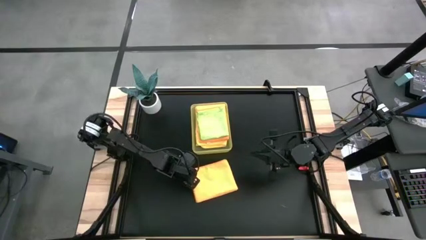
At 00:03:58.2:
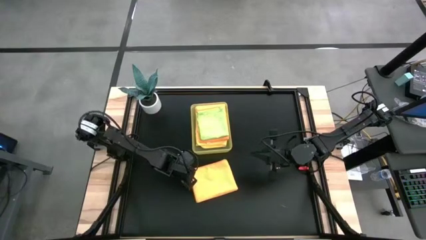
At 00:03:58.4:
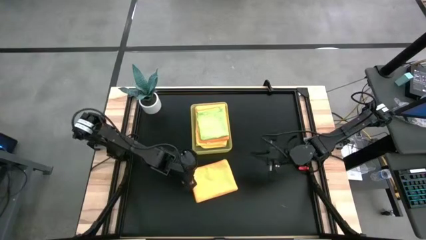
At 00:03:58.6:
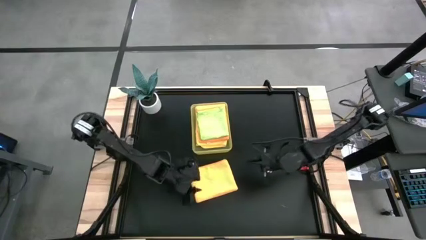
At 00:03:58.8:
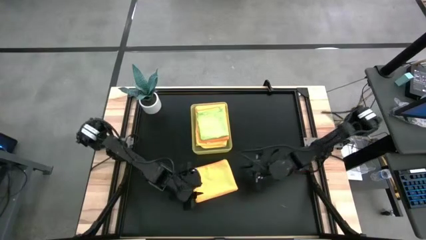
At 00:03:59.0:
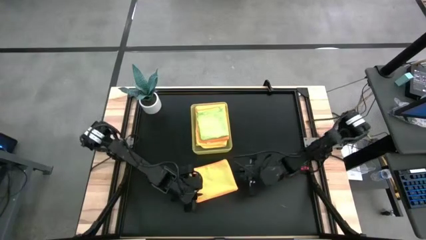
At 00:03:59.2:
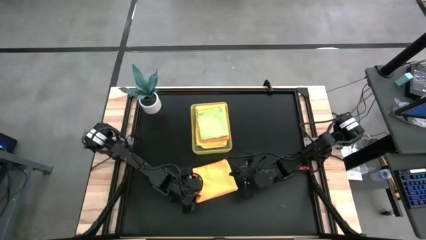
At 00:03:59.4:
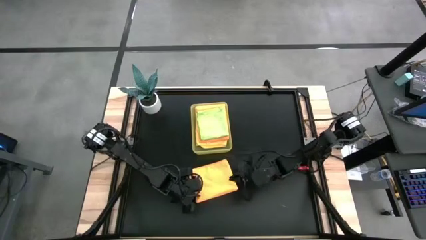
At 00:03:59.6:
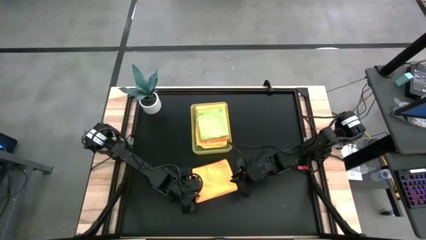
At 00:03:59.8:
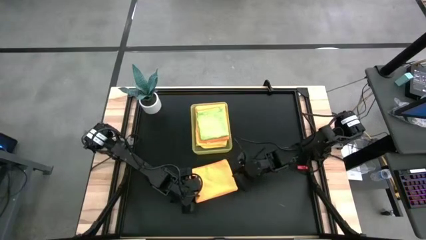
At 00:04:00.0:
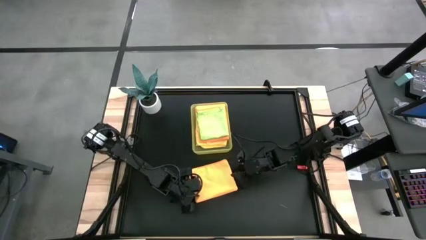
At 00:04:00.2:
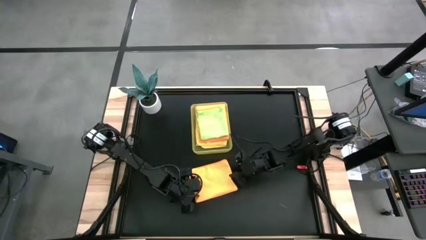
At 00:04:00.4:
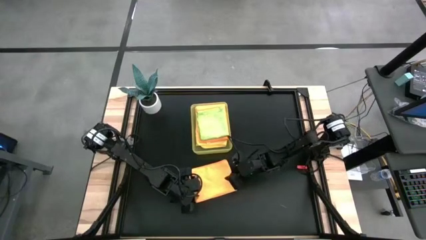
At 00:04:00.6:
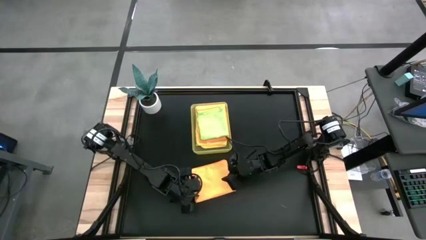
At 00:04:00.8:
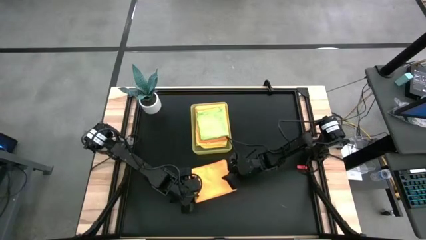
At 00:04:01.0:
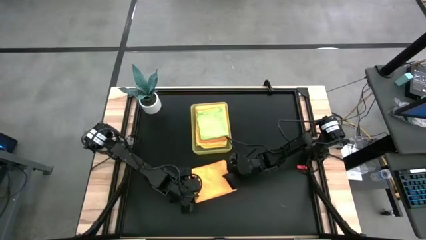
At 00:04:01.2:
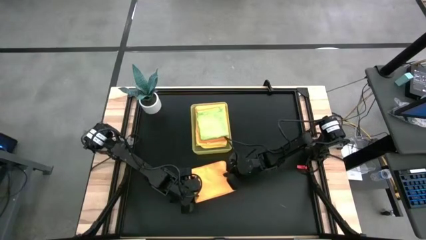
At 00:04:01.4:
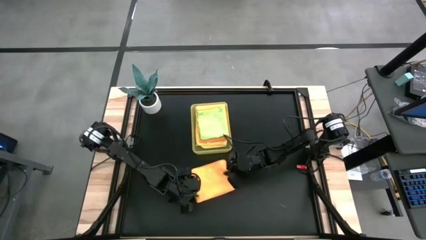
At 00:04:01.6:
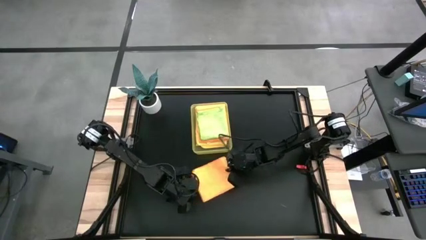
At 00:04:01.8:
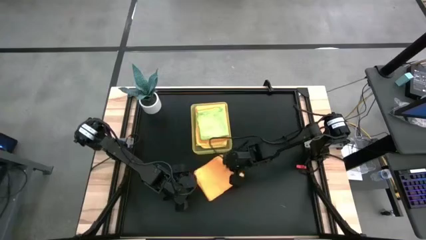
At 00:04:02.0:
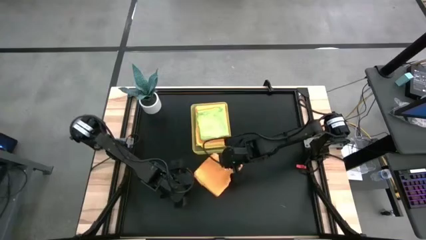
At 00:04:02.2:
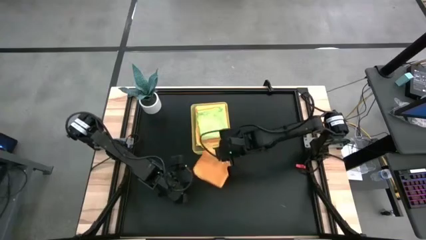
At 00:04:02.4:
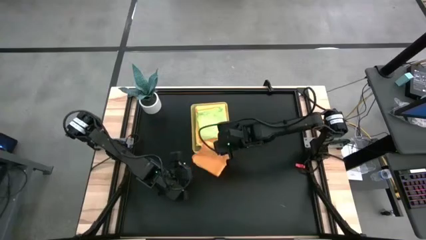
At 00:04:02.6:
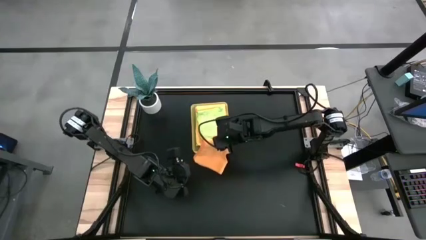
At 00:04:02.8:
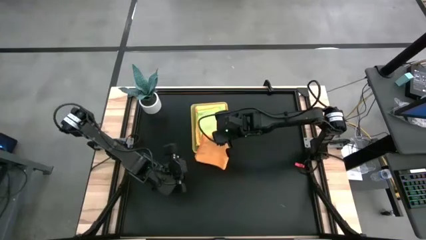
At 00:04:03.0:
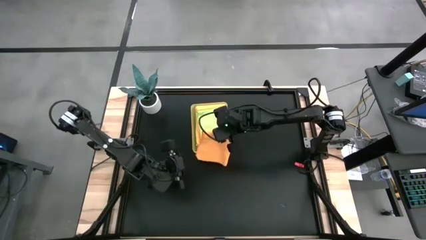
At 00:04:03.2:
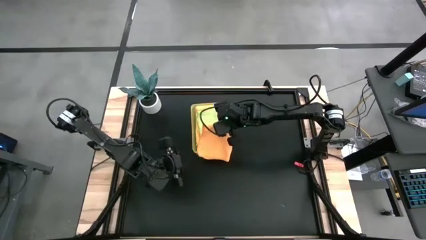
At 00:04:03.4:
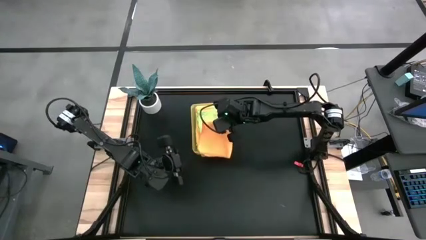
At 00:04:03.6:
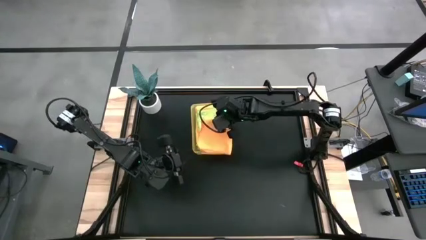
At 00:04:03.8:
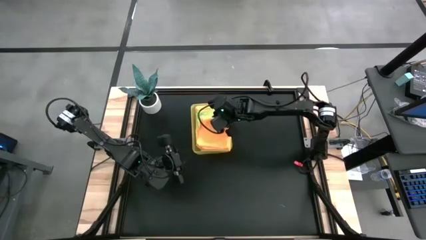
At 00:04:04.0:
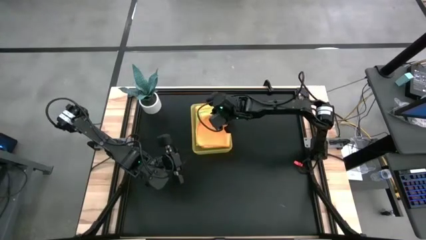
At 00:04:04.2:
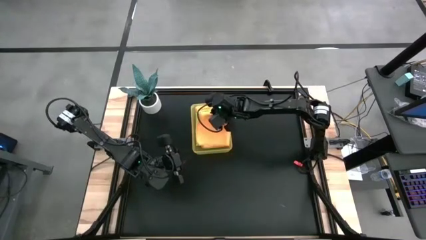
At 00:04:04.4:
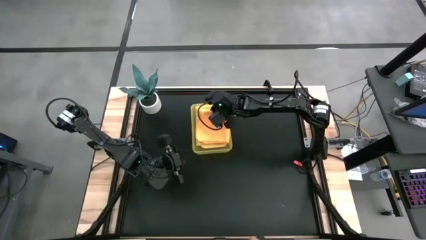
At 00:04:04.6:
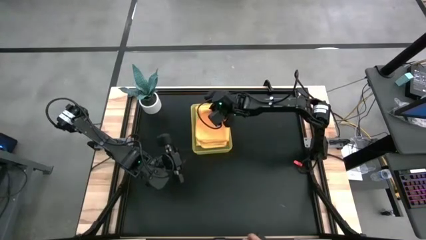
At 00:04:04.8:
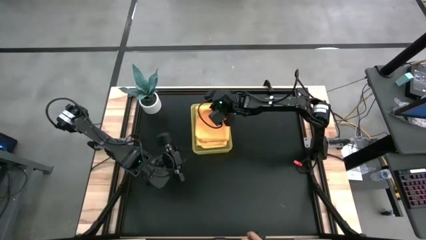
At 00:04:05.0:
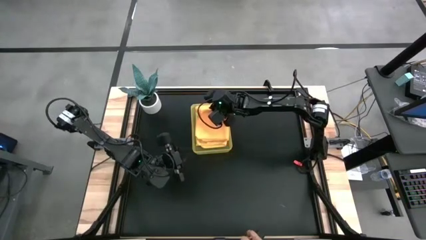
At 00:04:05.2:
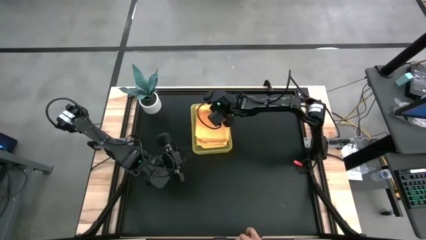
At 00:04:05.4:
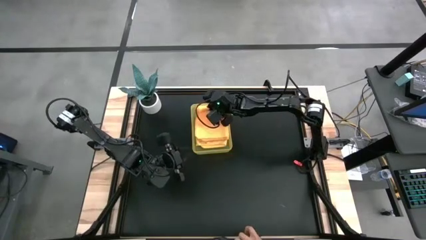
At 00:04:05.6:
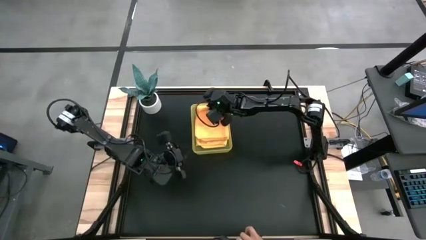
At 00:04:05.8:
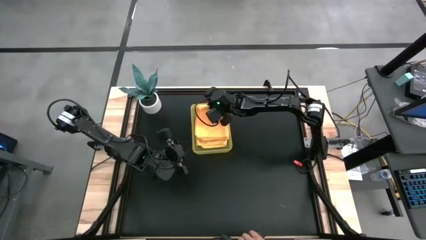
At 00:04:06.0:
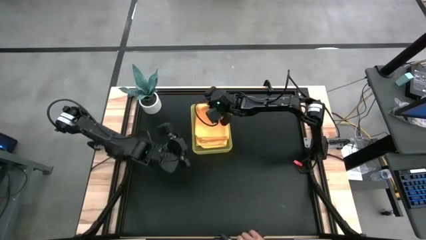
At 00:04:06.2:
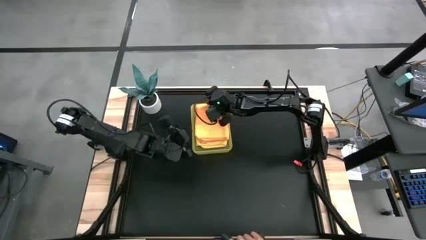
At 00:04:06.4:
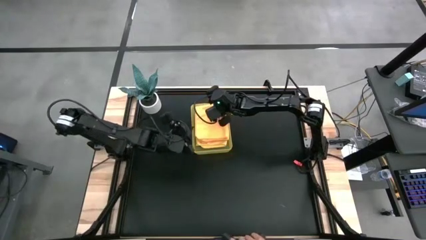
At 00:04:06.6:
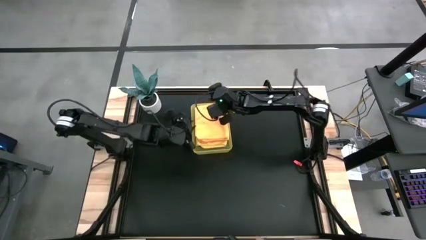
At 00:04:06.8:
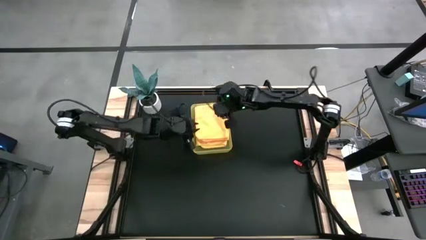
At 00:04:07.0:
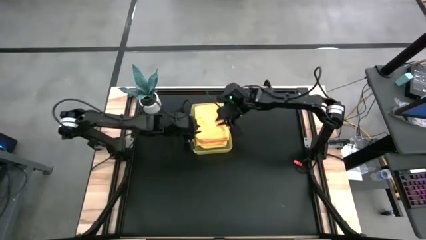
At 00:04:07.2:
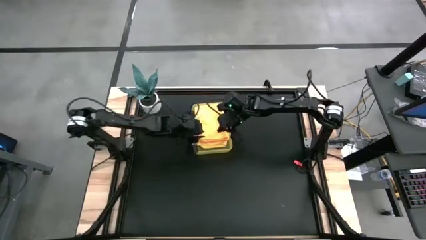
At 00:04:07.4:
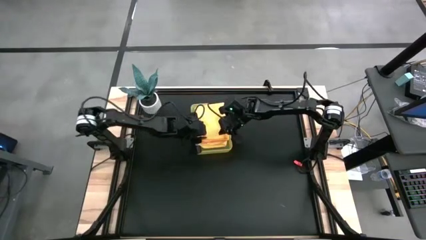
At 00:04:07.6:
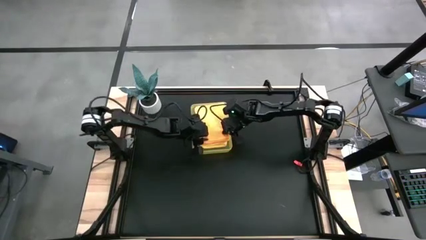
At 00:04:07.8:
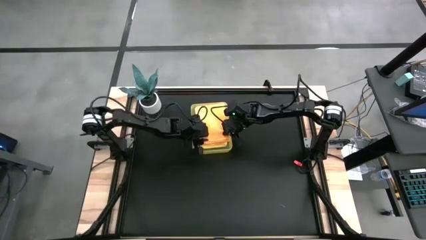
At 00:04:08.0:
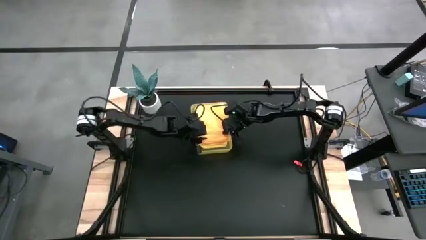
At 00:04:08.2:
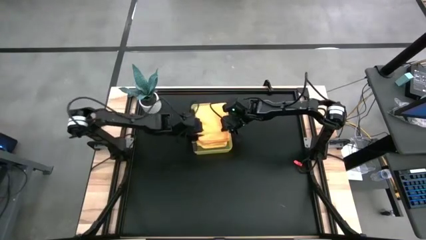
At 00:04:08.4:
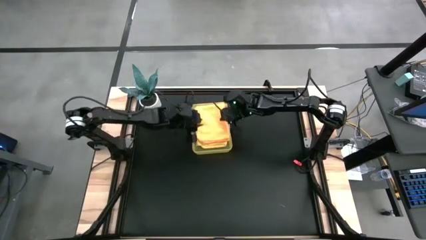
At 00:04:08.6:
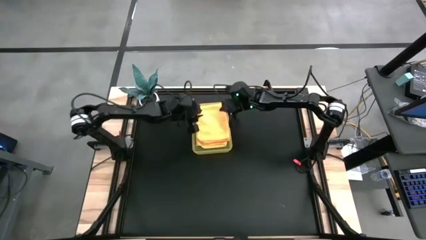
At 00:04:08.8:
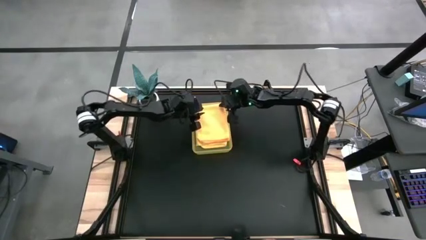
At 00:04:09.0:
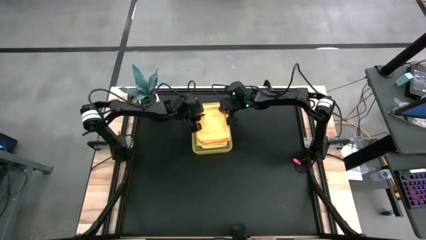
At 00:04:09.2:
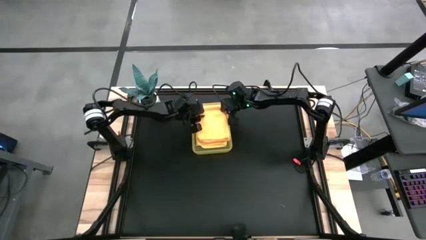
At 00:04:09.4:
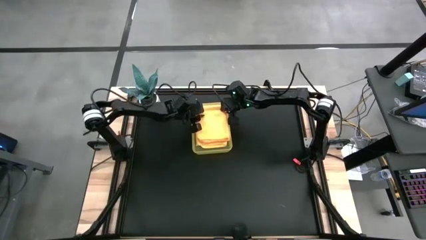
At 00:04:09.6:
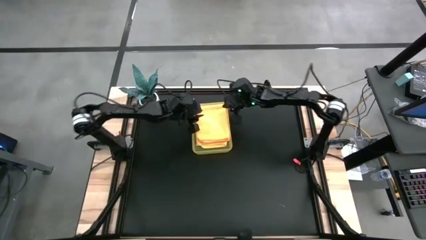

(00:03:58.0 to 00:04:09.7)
Task: Fold microfiber towels
Put the folded orange microfiber fiber cloth green microfiber cloth into the bin

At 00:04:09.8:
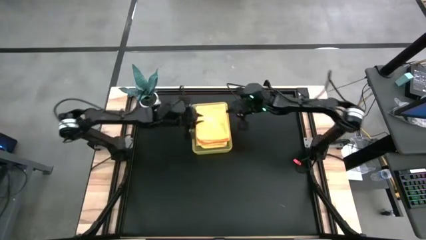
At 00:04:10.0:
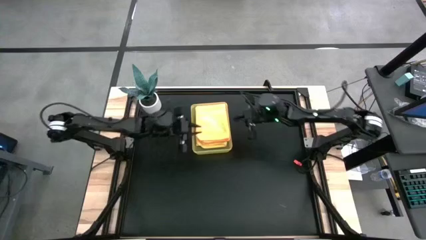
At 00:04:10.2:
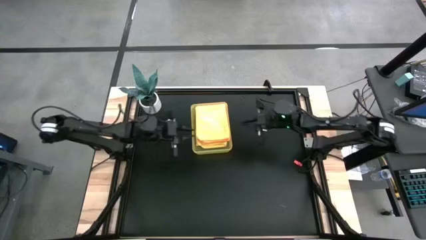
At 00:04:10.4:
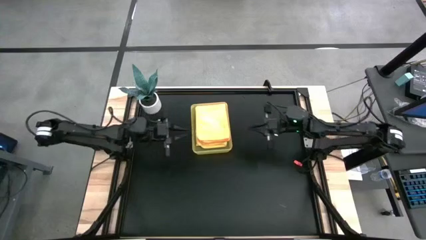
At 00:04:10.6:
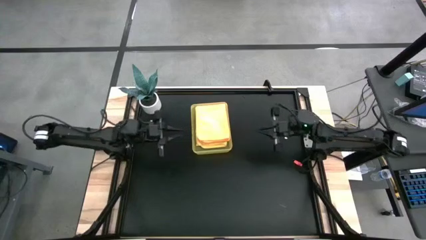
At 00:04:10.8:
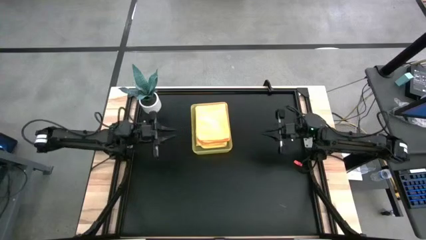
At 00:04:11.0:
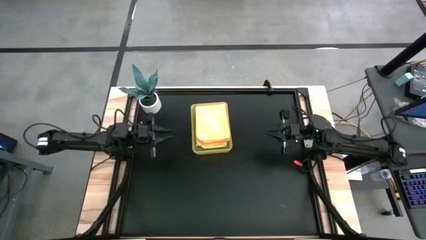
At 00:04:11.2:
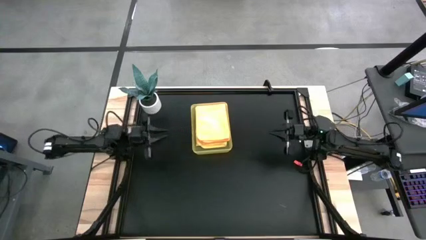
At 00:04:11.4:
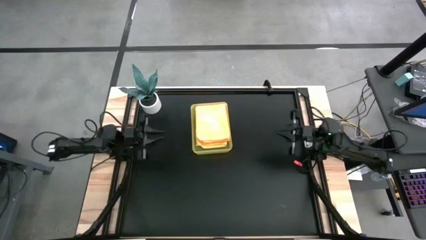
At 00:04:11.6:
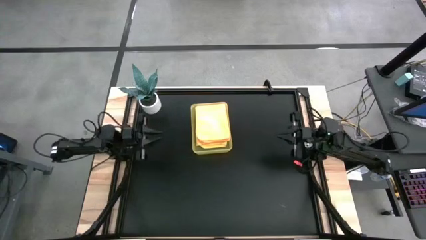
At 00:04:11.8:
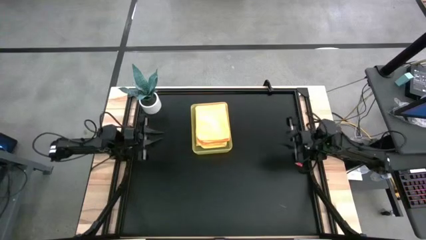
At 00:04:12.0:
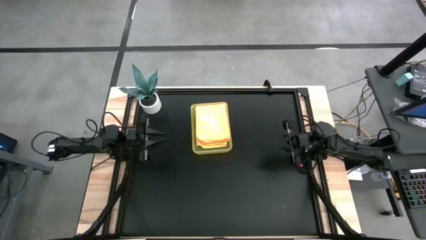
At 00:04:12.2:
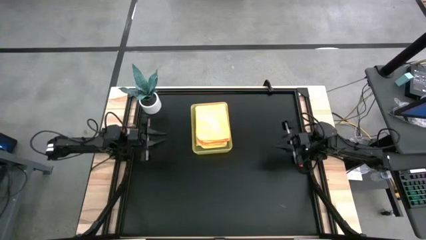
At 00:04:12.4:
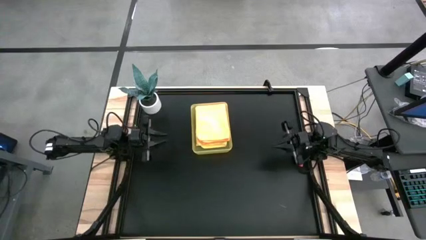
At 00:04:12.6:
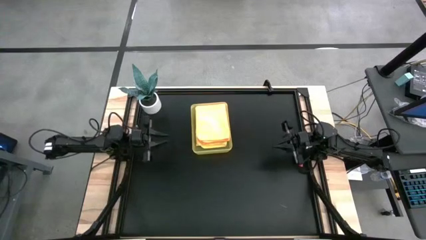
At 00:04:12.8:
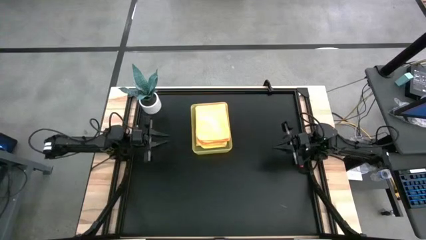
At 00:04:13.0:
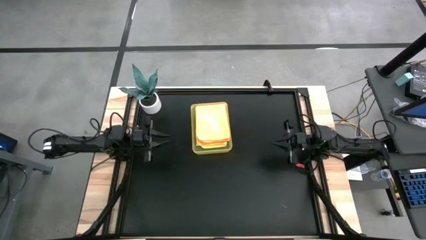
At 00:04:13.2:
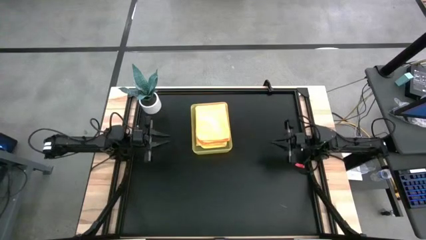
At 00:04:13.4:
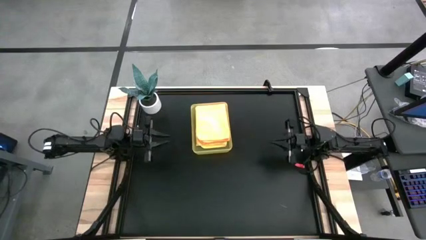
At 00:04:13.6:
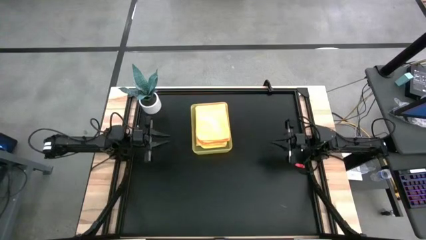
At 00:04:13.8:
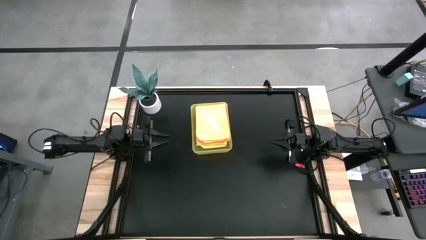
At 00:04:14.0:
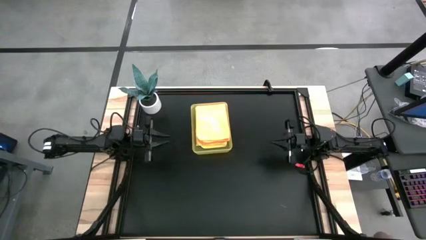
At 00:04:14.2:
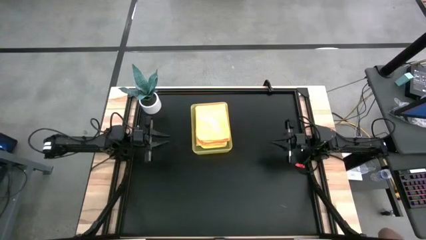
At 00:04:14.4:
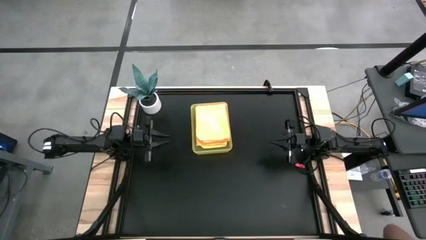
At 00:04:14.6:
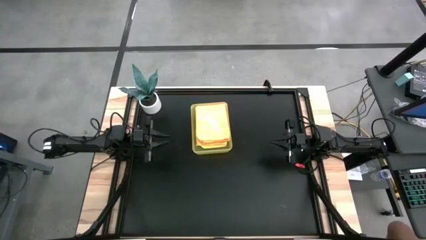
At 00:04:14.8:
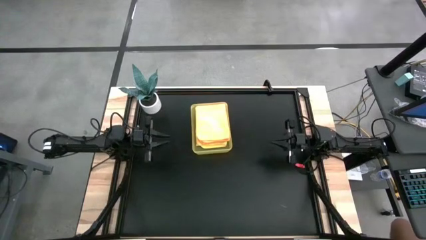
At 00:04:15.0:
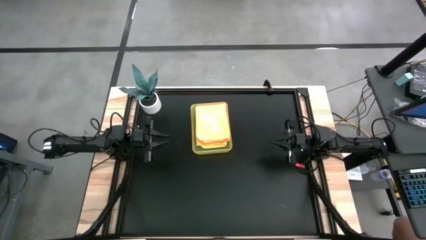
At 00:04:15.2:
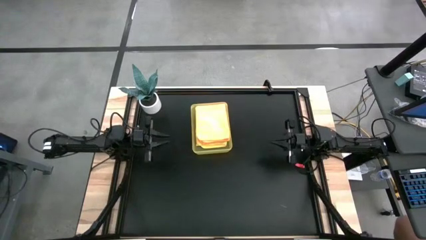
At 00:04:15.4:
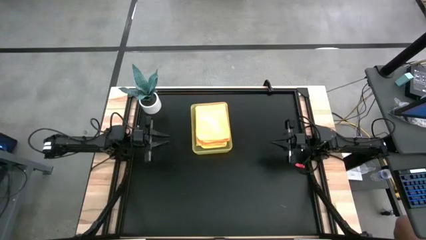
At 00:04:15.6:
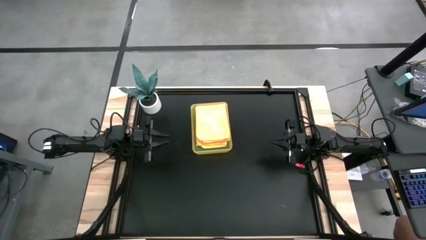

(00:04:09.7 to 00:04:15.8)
Return to Home Position
